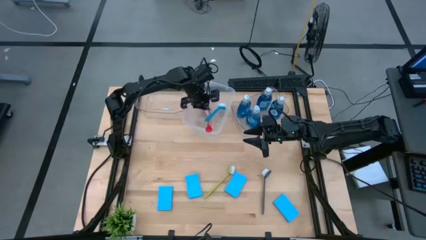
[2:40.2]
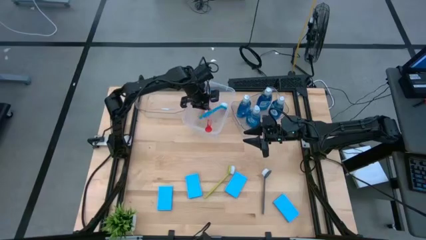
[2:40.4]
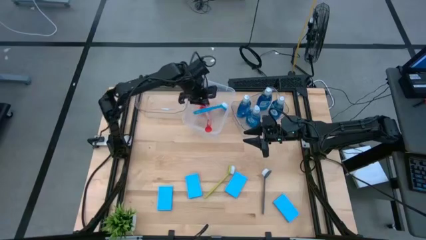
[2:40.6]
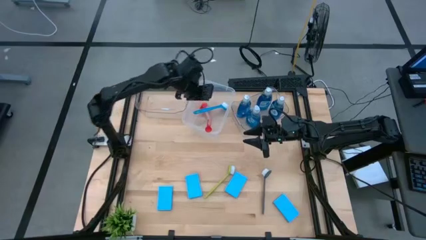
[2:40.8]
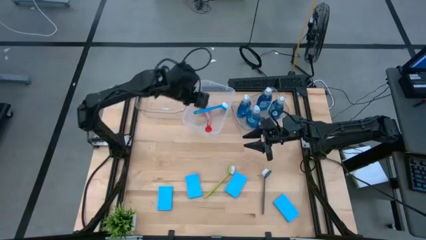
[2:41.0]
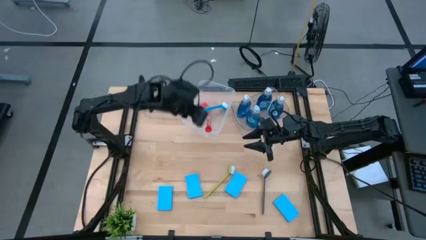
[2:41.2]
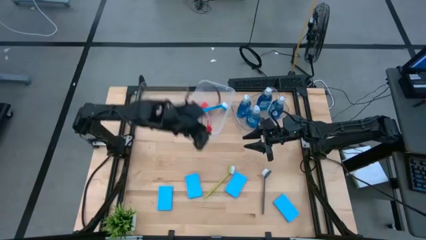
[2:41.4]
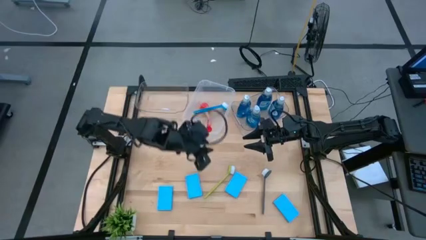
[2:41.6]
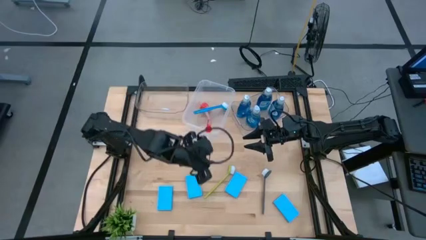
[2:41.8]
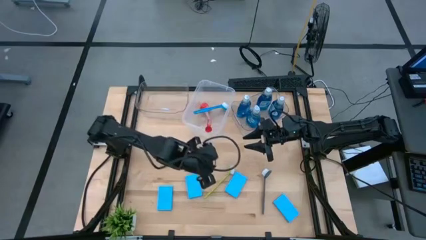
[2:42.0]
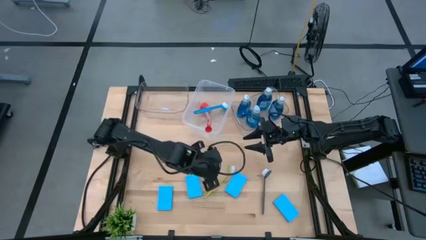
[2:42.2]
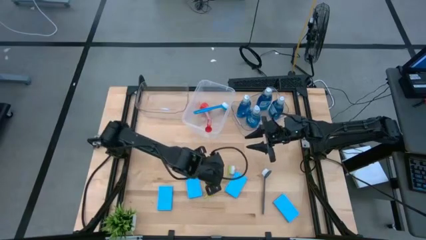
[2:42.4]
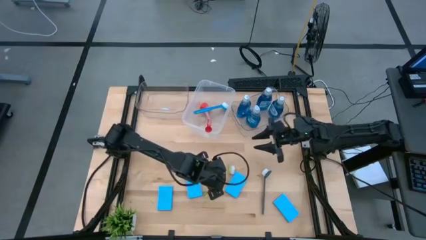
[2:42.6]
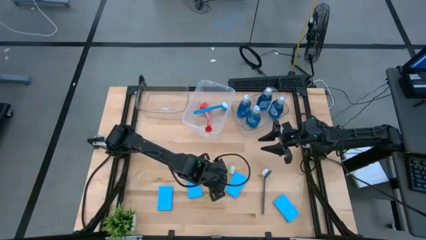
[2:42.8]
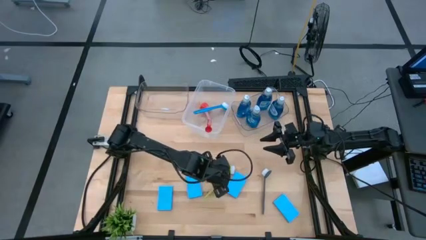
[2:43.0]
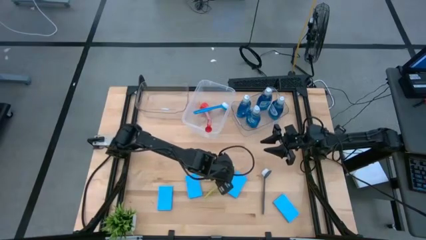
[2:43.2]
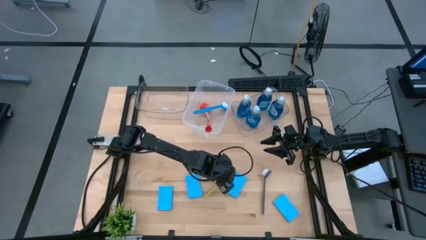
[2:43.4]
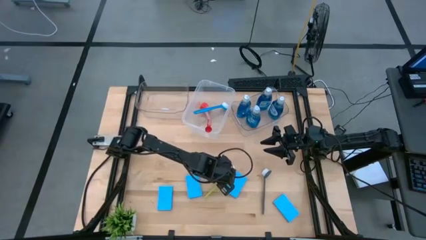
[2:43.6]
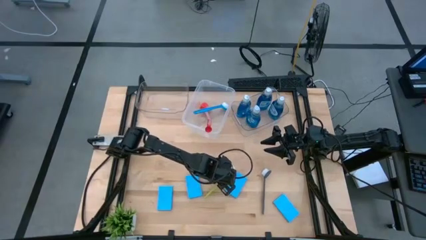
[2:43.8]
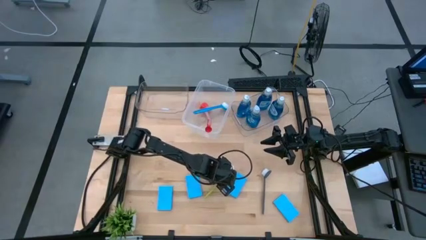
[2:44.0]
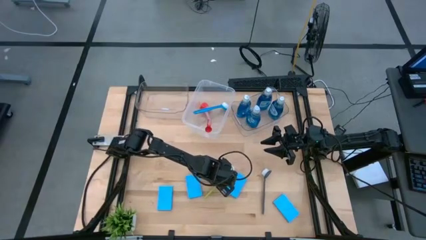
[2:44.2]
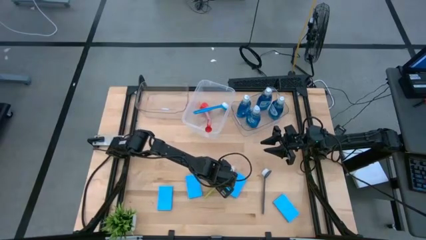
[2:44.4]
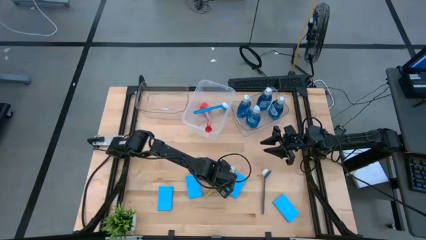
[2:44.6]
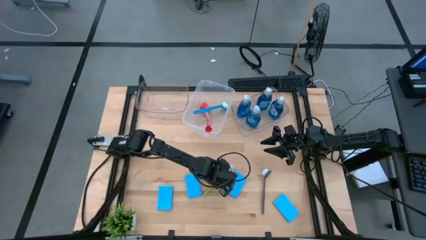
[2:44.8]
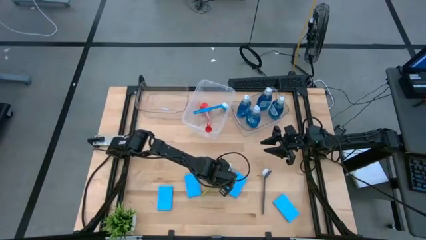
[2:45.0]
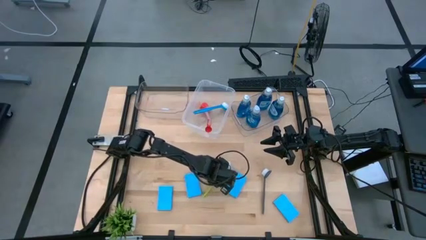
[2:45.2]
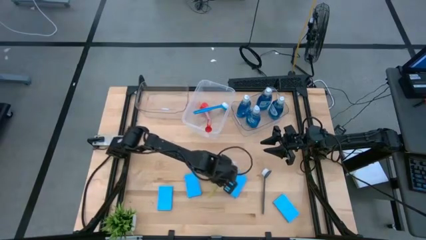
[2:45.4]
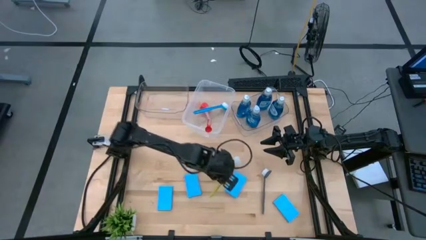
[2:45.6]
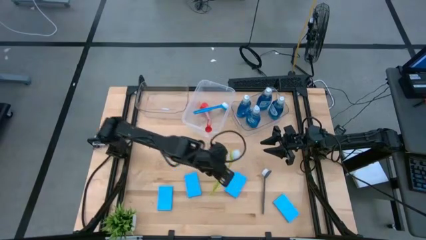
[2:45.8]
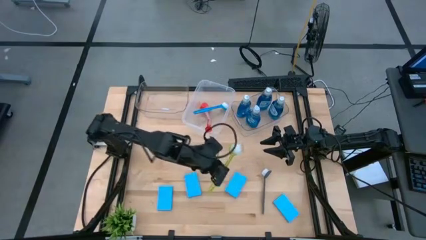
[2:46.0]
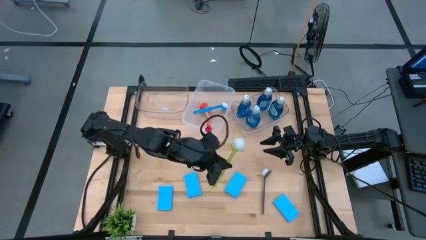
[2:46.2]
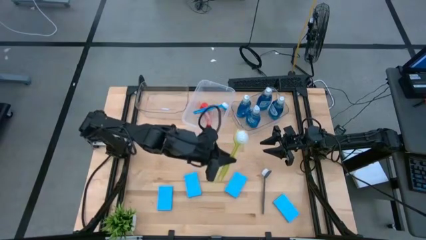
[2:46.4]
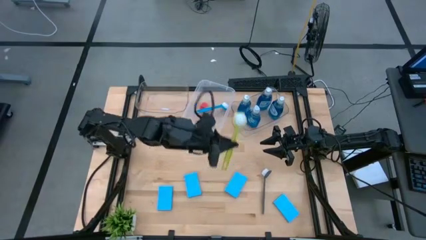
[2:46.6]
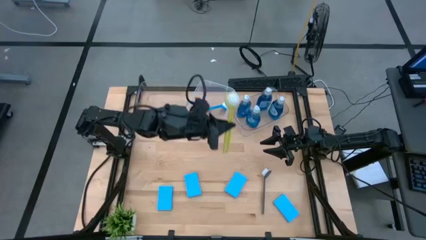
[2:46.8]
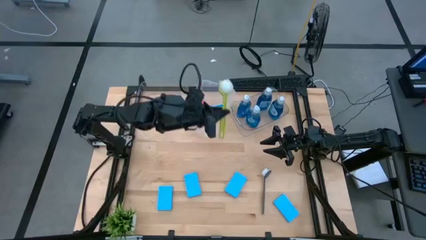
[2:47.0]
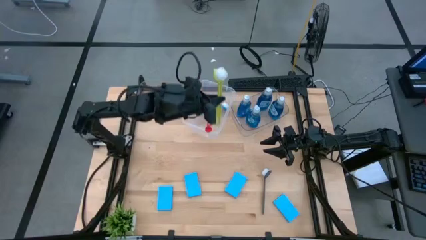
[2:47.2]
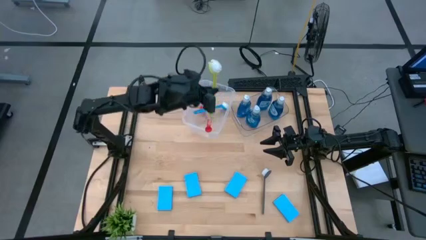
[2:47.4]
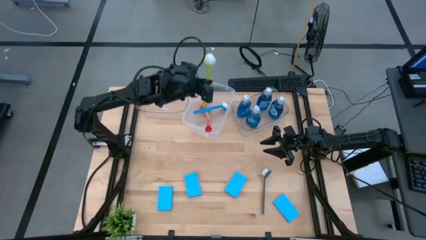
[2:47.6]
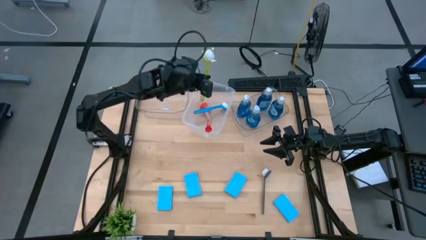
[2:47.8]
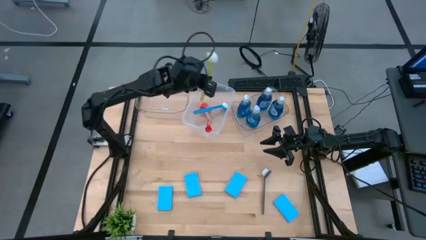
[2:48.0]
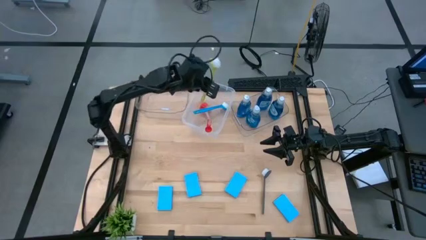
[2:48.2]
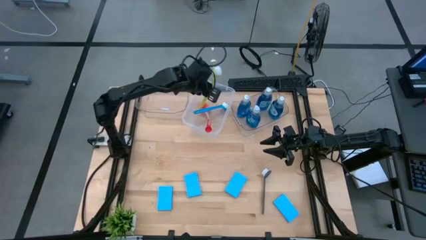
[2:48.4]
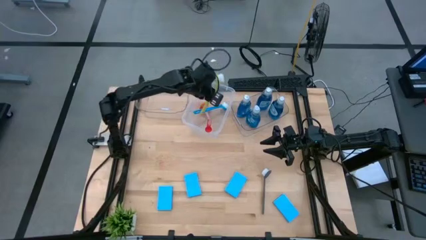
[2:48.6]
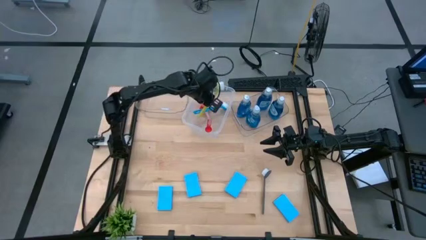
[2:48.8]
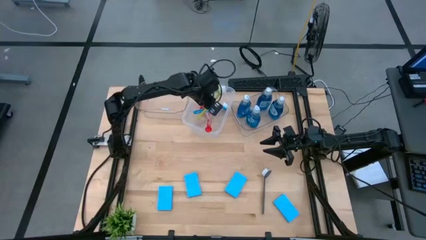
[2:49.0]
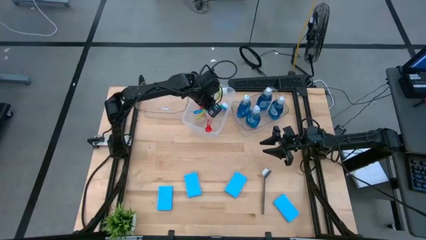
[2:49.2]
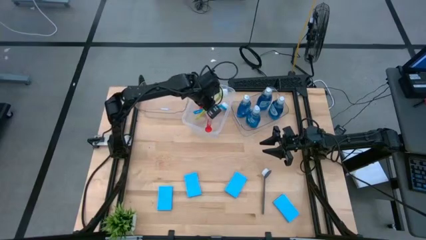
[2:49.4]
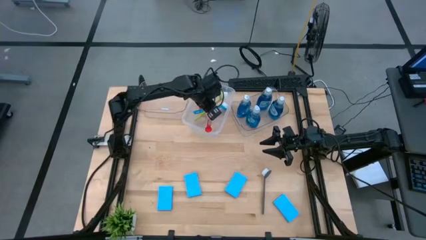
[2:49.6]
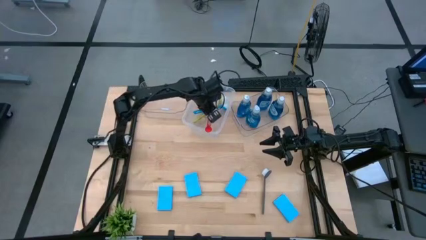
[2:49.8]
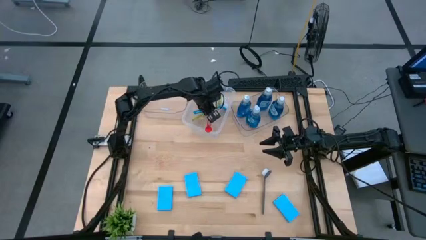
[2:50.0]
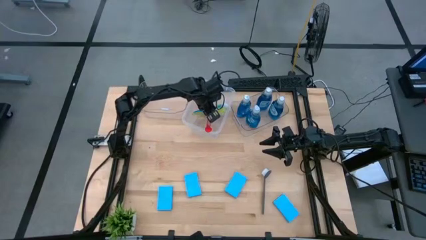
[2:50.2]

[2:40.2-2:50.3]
Task: Pick & Place Kitchen Sink Supplies
Put the light green dish brush into the transparent container

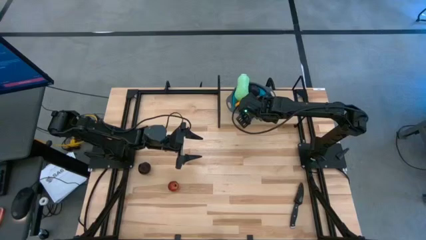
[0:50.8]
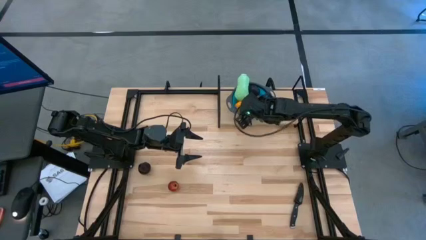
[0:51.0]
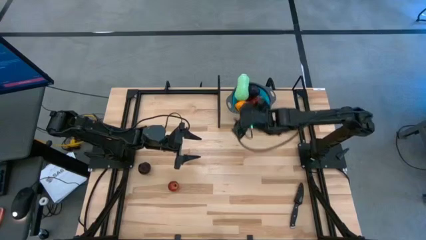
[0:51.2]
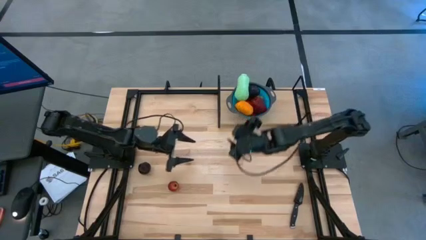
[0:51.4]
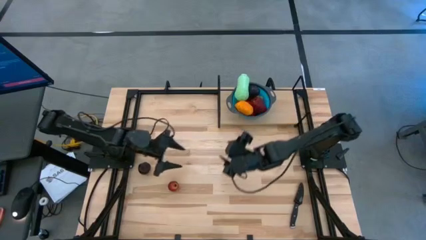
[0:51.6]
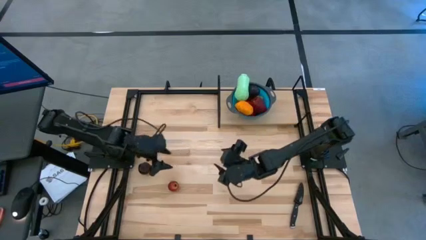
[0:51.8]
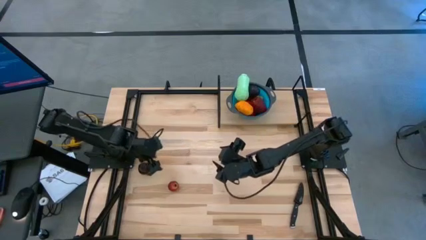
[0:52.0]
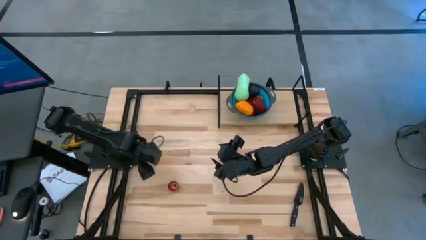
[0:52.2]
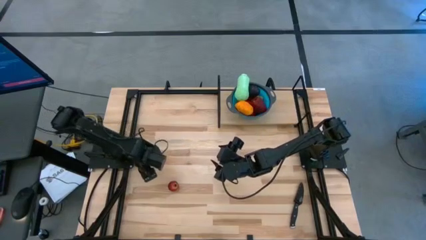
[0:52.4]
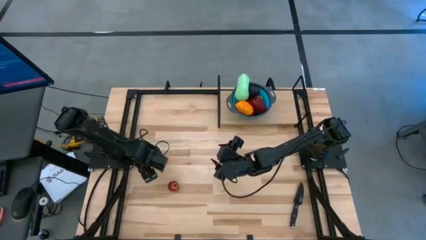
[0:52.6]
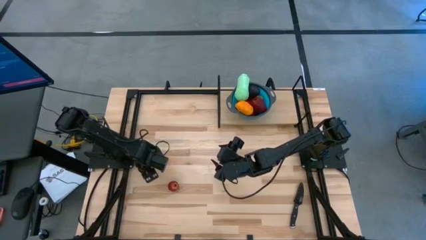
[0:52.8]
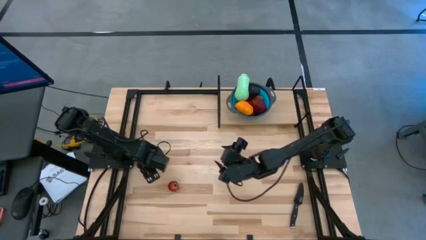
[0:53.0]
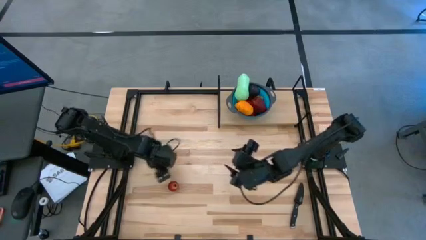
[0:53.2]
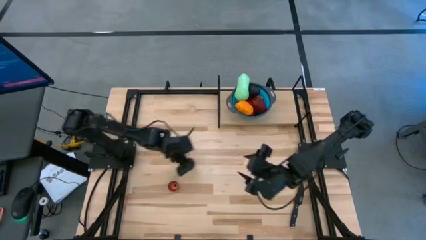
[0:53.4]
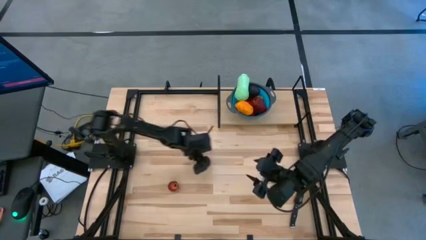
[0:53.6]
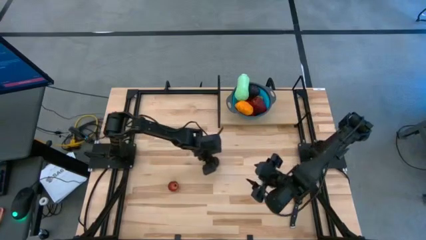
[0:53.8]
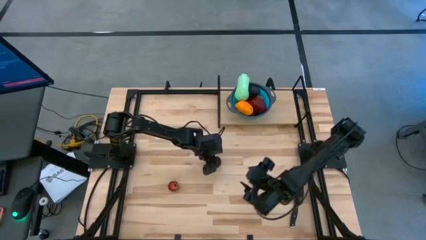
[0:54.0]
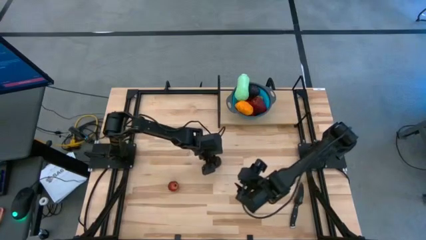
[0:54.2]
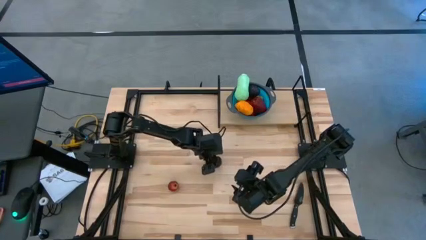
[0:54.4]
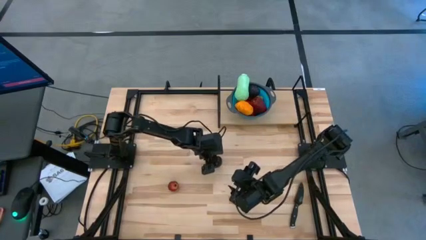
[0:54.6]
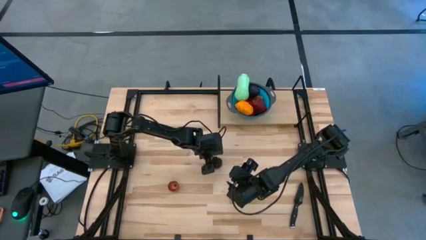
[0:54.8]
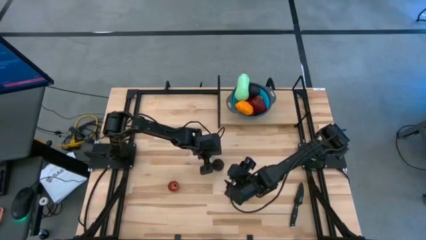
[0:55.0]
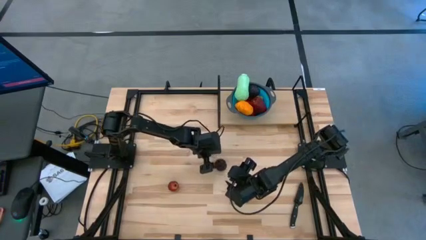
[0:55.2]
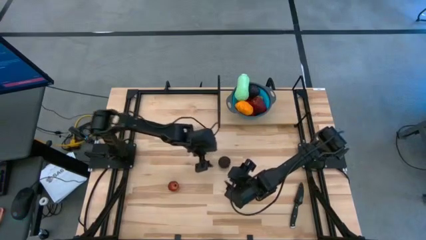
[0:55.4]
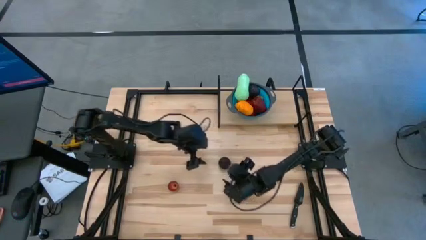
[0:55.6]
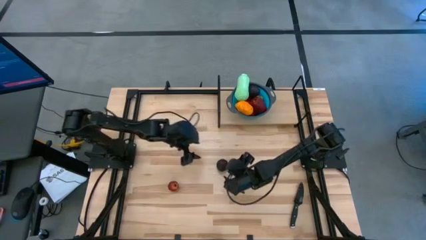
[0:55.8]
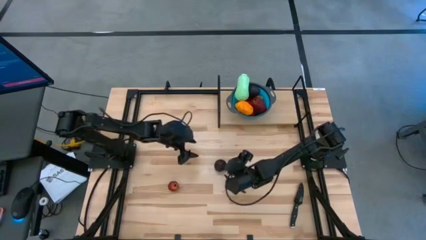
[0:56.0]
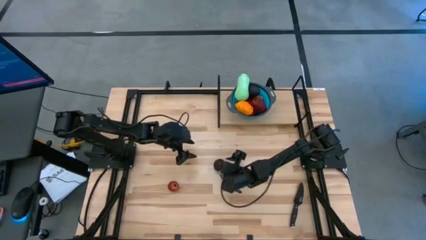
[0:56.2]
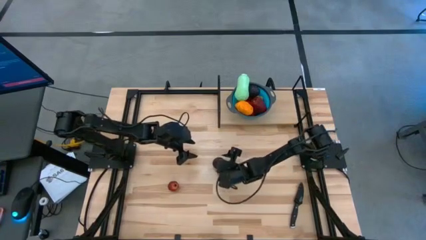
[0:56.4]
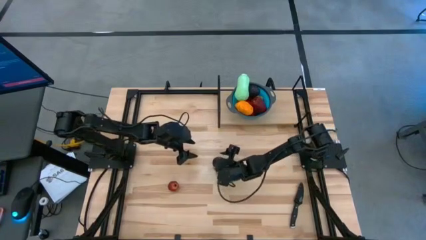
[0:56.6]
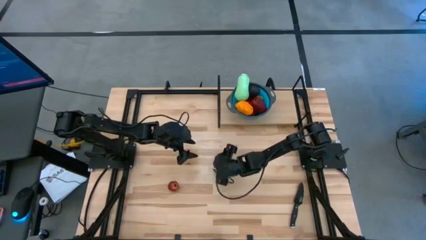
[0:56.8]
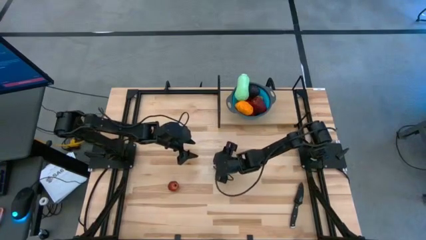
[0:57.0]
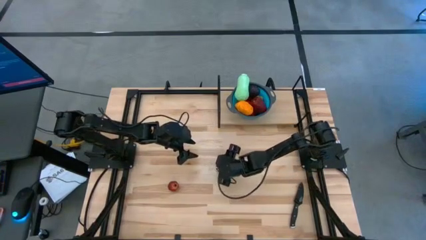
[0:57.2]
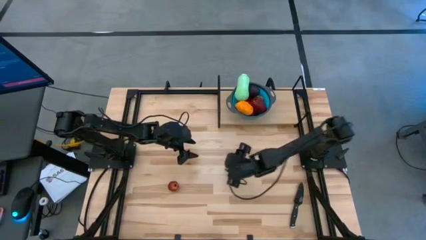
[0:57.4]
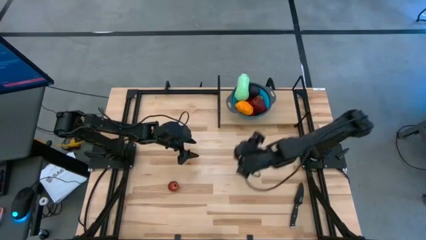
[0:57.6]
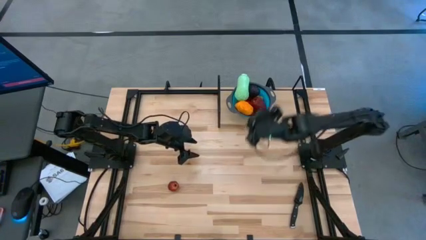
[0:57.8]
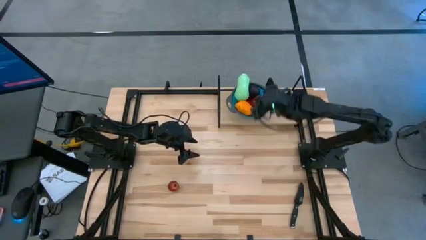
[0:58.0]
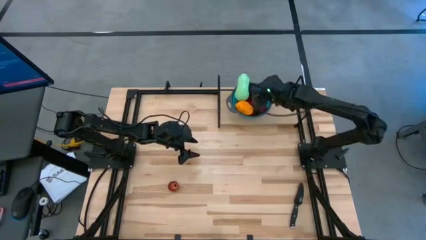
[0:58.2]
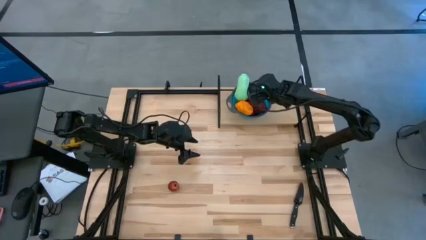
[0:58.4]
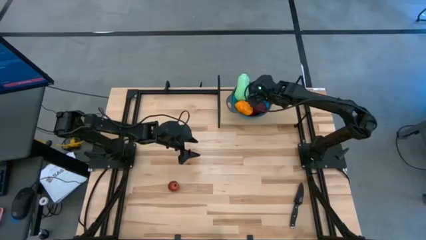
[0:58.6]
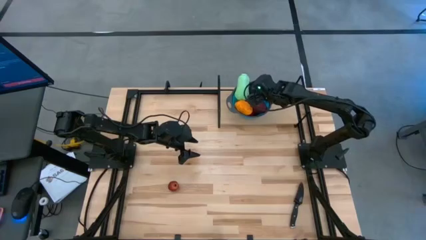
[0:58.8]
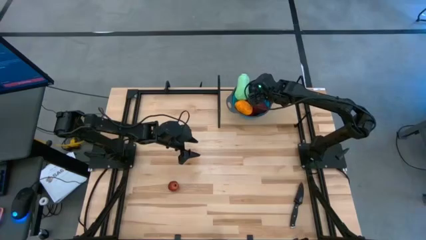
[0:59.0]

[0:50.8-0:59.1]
Task: Pick & Place Fruit
Put the black plum into the blue strainer bowl on the shelf
